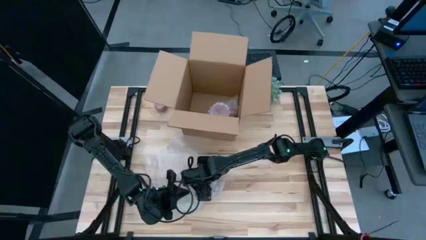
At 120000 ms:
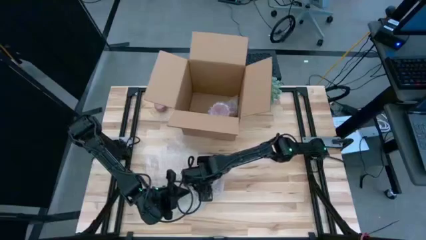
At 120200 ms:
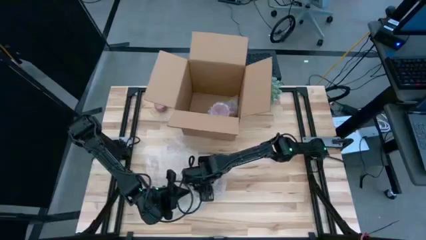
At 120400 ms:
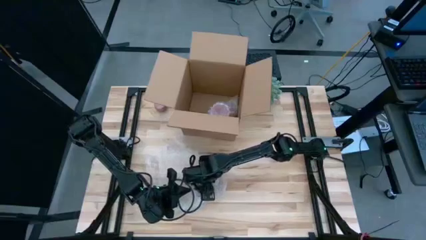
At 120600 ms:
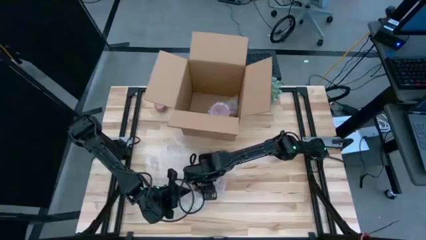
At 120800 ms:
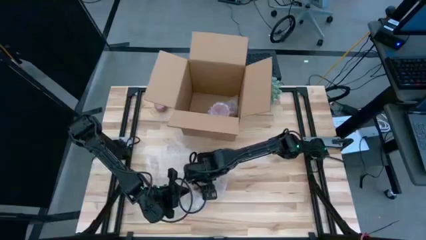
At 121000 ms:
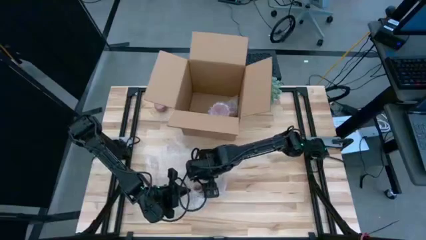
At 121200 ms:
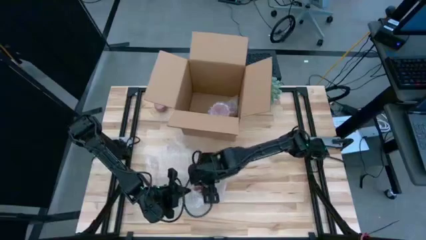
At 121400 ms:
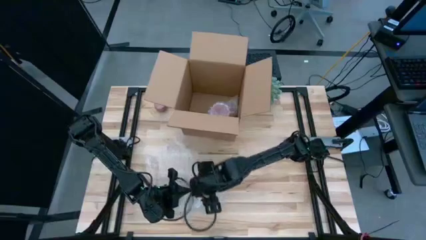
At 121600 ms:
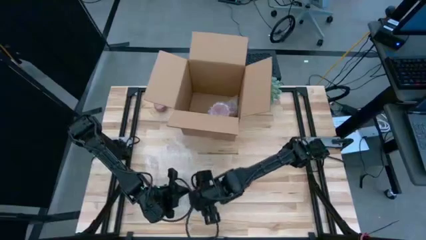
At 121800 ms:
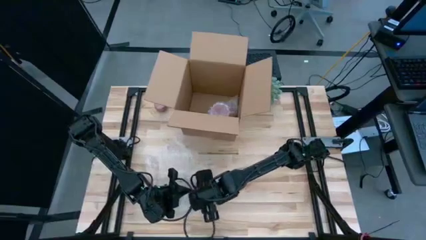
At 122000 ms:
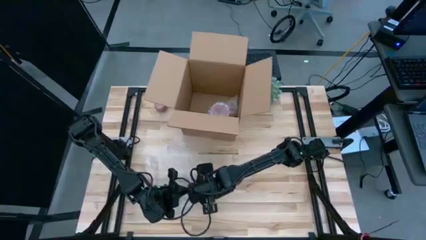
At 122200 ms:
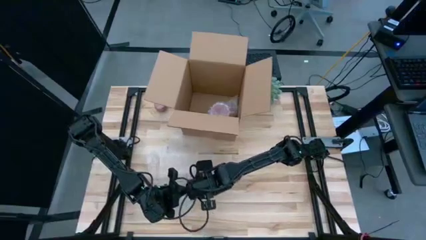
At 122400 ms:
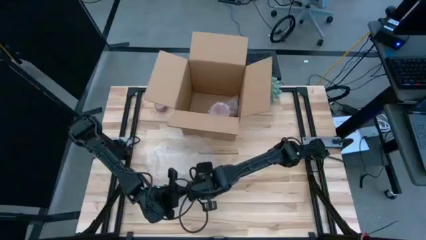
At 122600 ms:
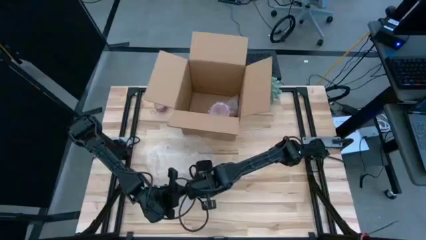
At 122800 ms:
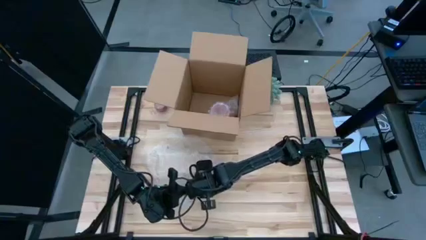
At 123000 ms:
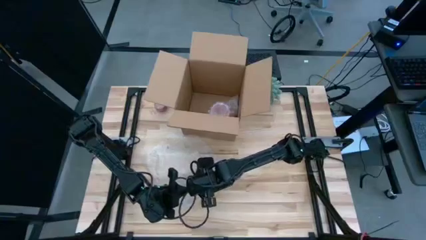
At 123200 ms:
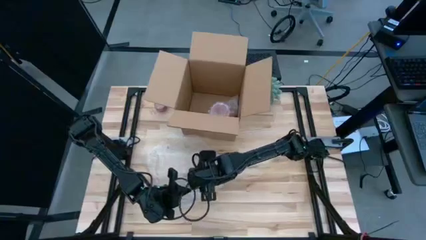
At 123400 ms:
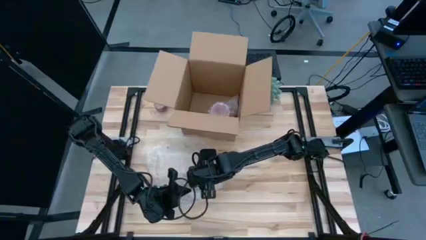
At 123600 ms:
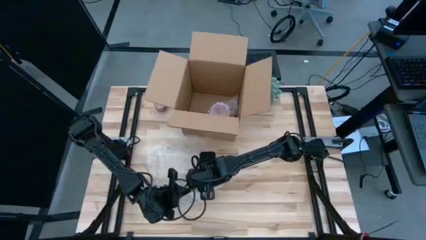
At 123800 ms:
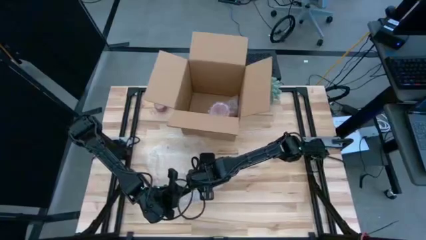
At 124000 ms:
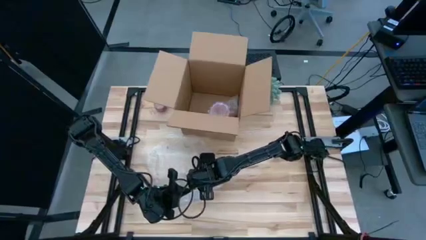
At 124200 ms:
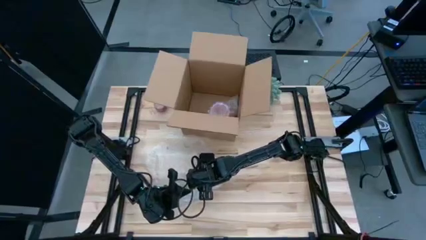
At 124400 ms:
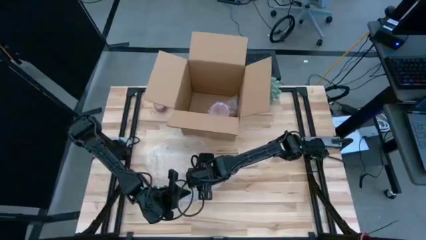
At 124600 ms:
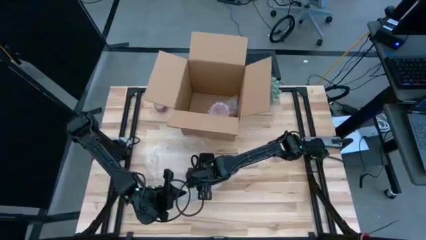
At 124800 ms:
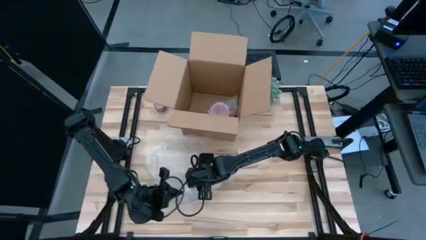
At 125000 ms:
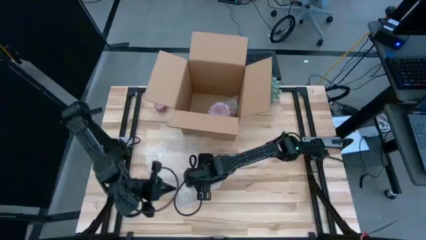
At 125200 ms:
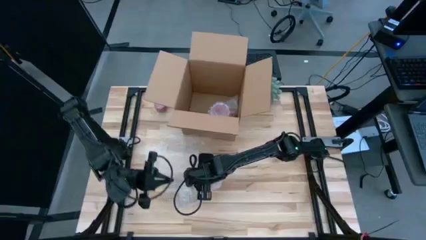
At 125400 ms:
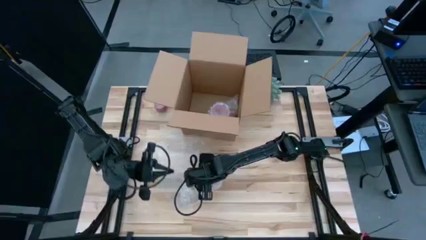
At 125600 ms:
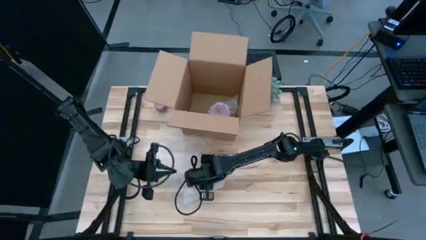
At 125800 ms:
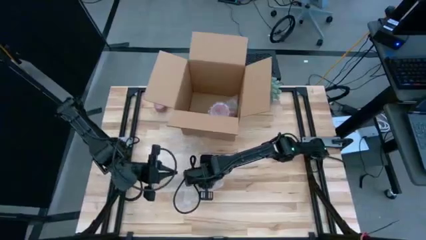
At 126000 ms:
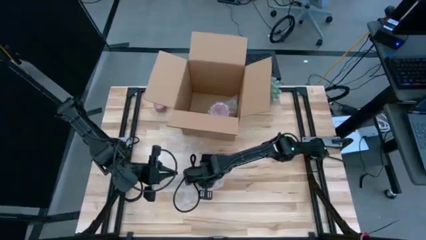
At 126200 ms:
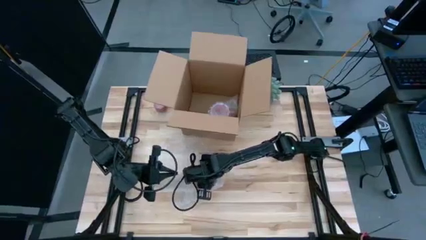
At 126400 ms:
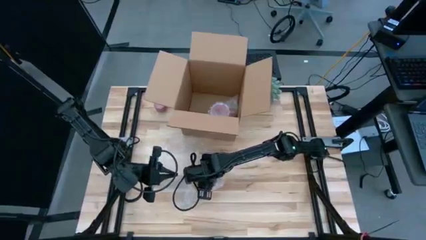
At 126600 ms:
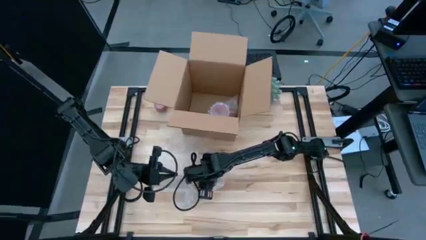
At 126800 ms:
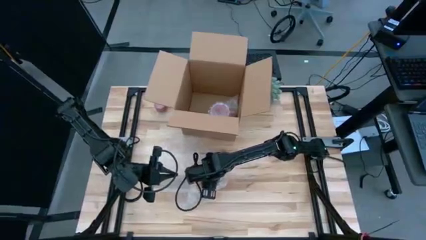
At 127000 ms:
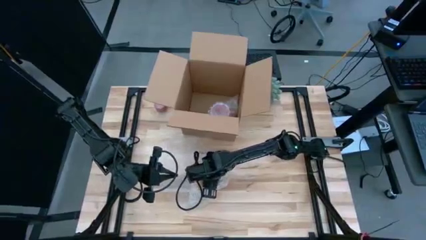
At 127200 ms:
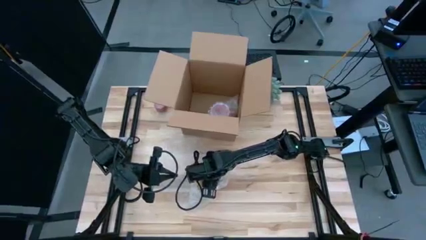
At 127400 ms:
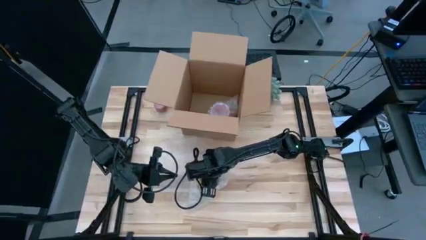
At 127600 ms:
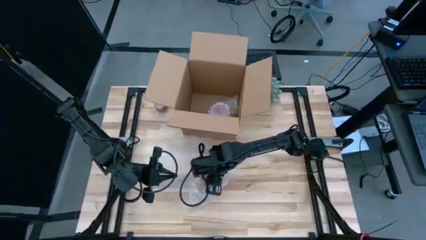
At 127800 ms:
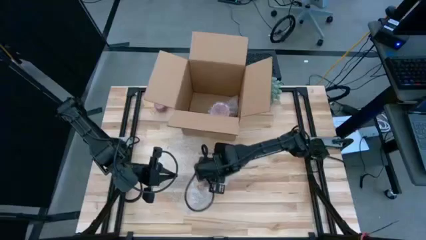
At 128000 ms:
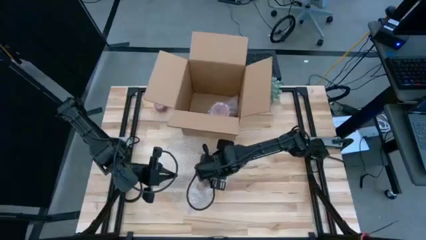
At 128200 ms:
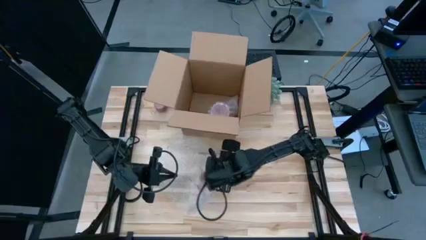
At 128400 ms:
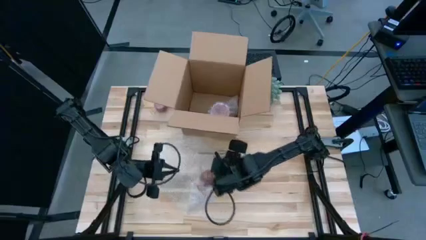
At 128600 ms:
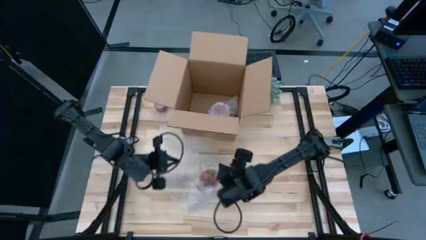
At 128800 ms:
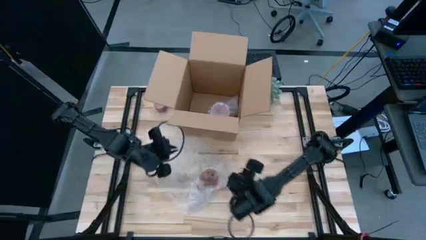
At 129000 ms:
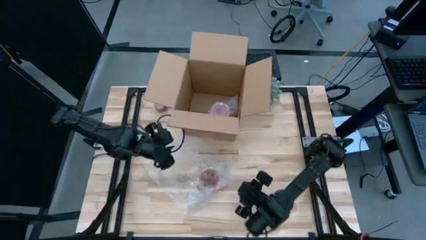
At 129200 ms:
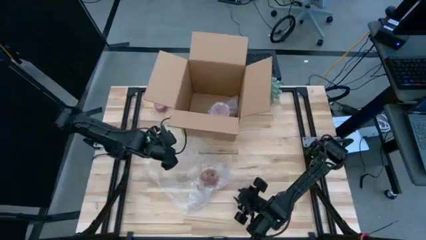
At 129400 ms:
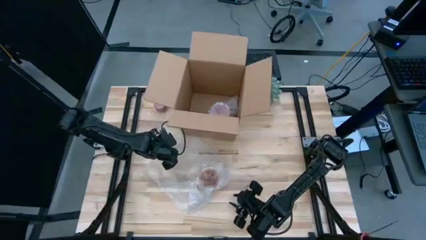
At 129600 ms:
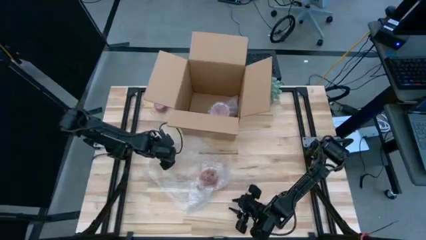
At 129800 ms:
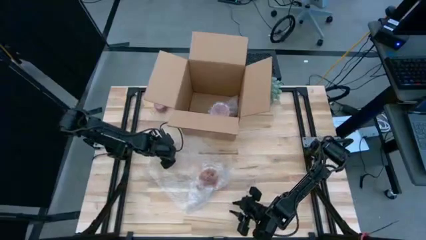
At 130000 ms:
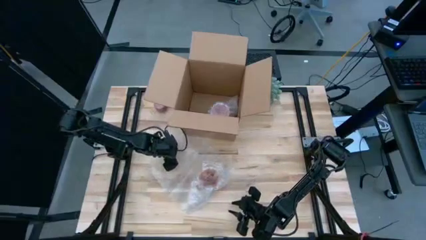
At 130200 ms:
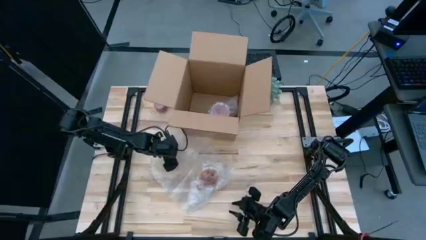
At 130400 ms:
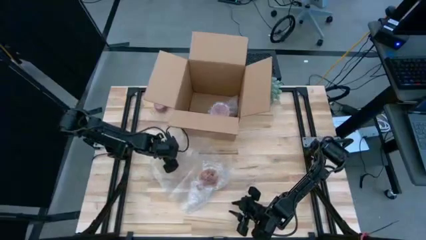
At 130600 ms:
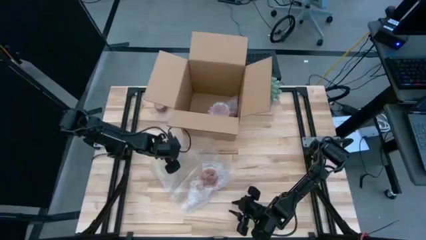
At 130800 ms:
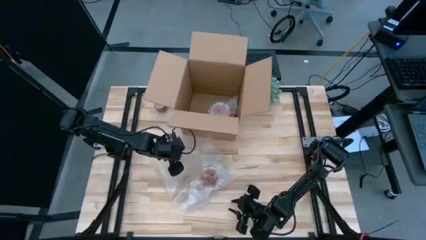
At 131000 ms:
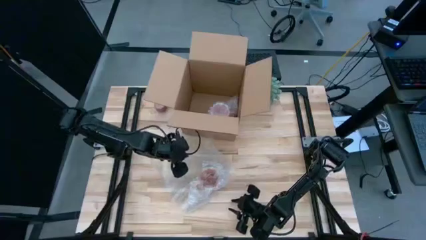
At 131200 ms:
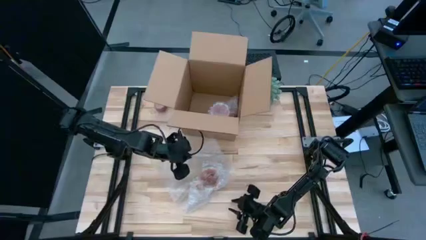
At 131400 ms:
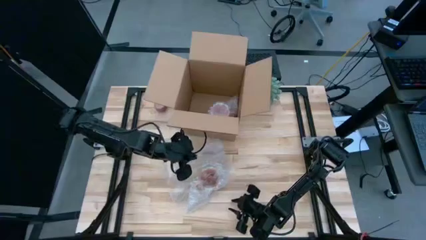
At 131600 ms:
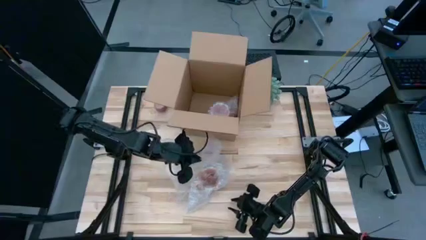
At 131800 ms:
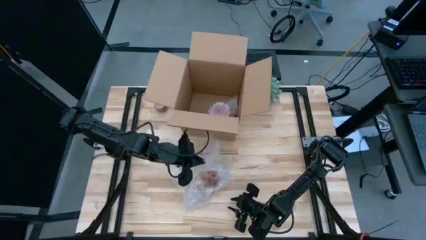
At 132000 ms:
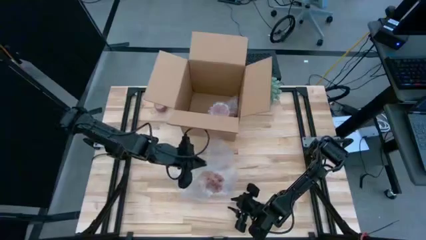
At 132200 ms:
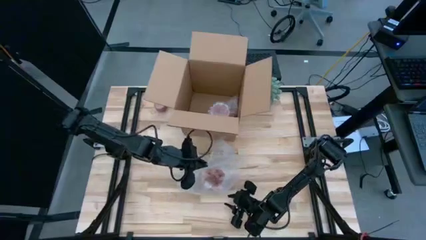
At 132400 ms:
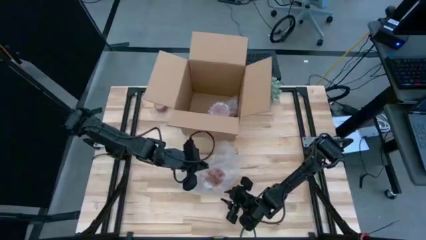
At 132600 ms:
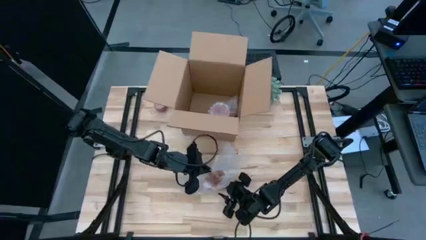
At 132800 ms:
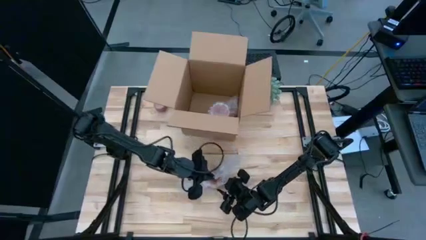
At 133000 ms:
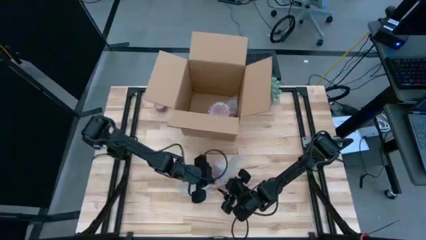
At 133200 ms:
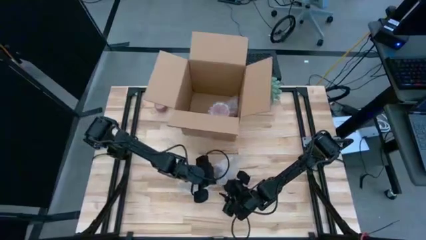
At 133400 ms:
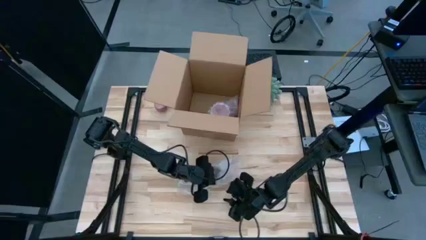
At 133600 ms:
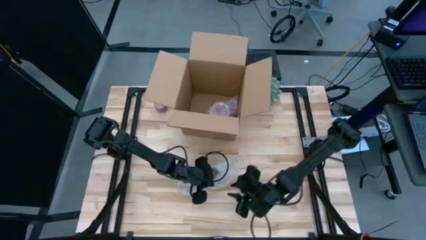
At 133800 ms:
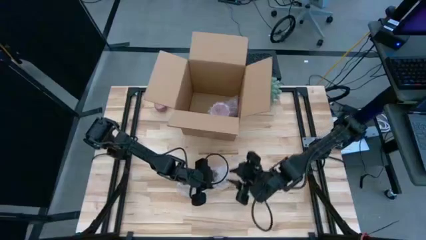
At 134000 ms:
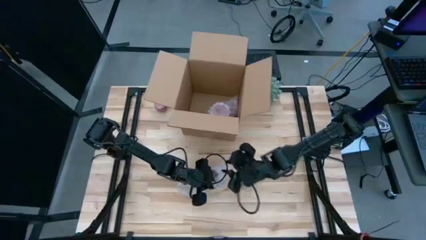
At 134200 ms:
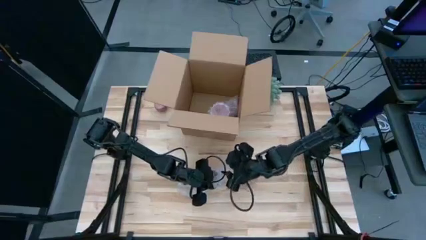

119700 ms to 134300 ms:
Task: wrap mug
Wrap the orange cup with bubble wrap

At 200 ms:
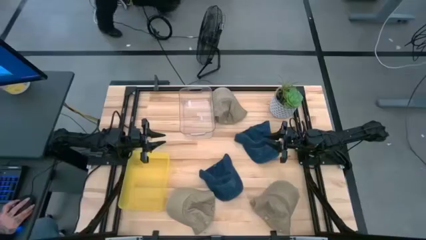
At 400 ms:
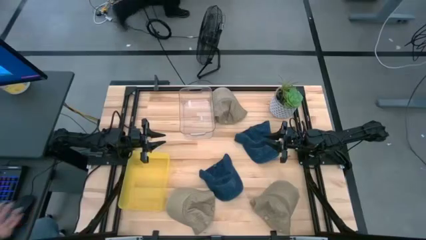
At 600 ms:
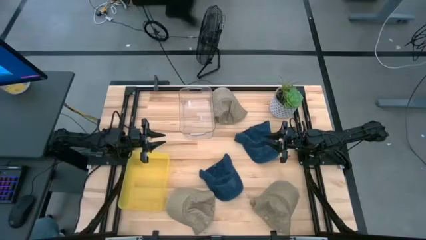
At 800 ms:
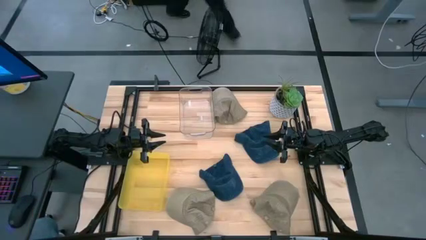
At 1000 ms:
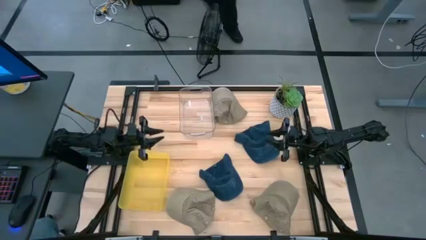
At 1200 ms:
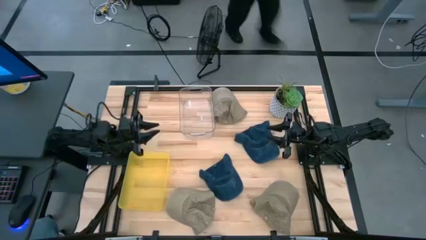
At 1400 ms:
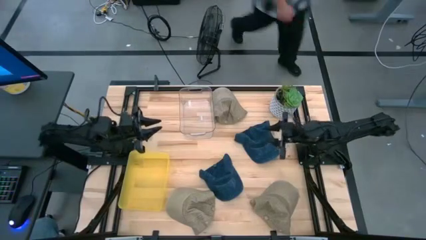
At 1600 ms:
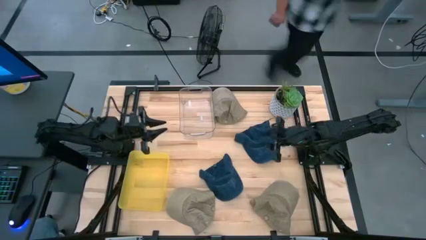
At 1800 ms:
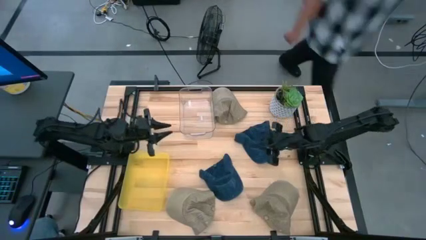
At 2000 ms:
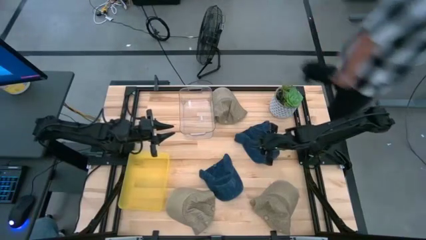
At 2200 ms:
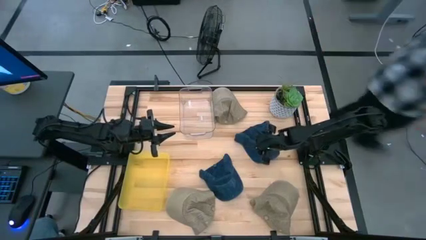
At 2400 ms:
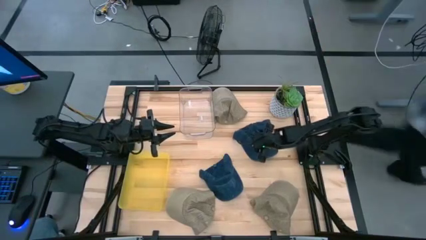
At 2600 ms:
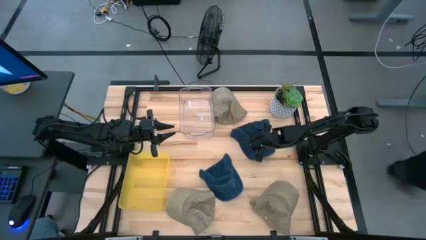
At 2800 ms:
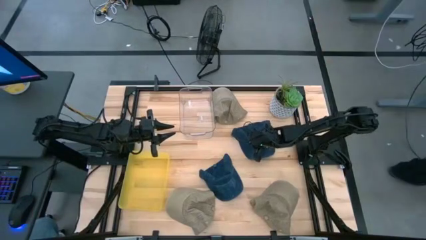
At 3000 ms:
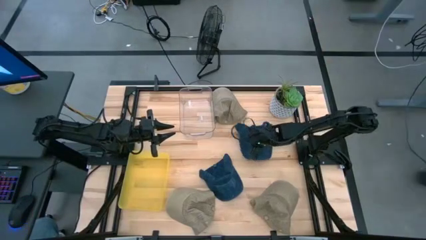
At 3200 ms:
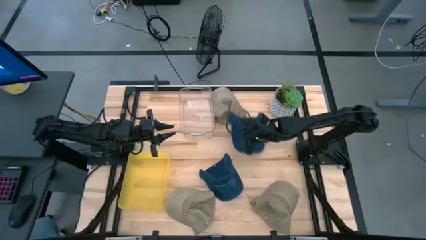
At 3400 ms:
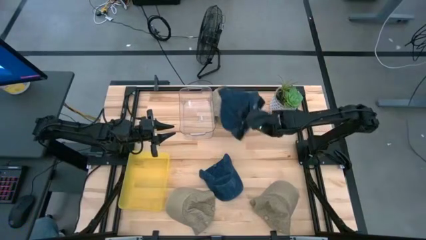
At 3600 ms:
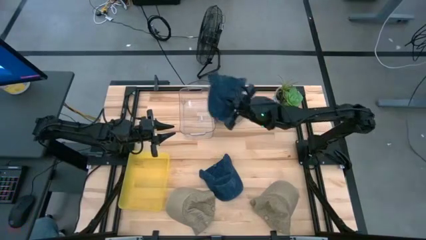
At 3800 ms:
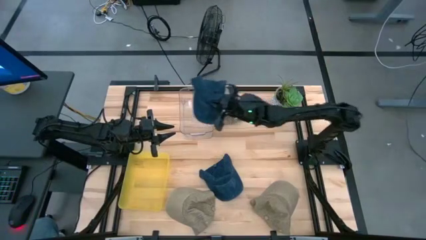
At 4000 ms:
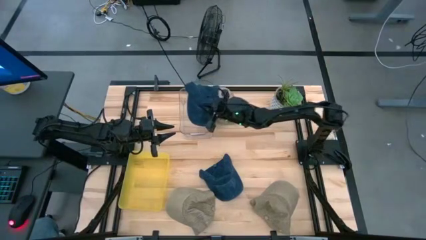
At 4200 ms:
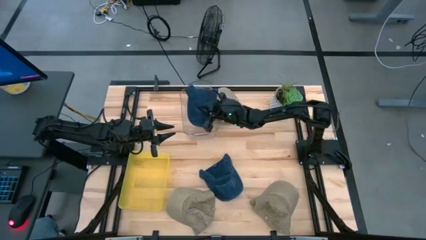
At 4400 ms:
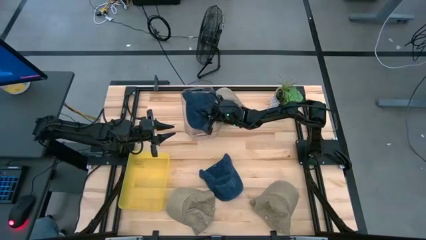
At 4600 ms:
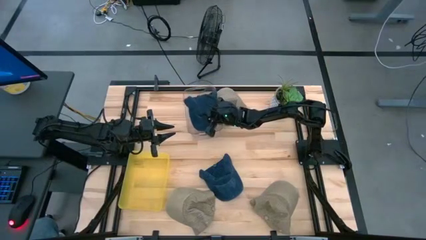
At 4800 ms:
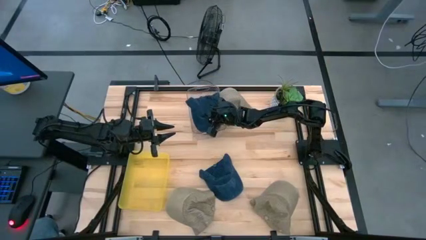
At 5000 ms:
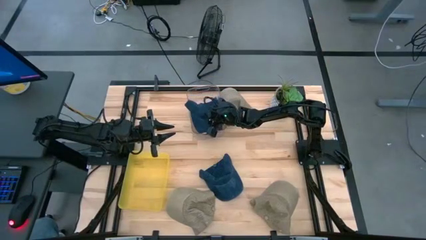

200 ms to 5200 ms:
Task: Pick & Place hat
Put the top blue cap into the transparent bin
